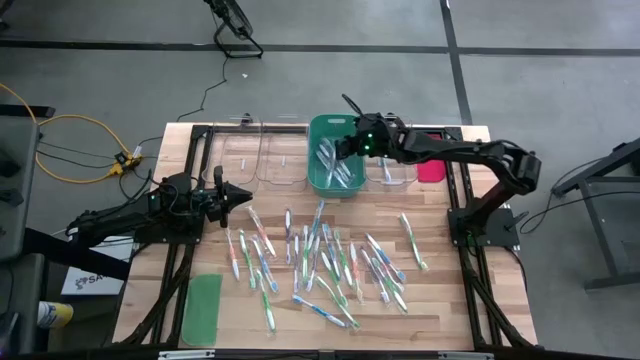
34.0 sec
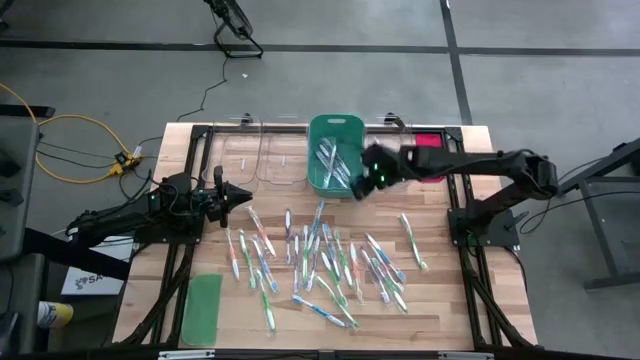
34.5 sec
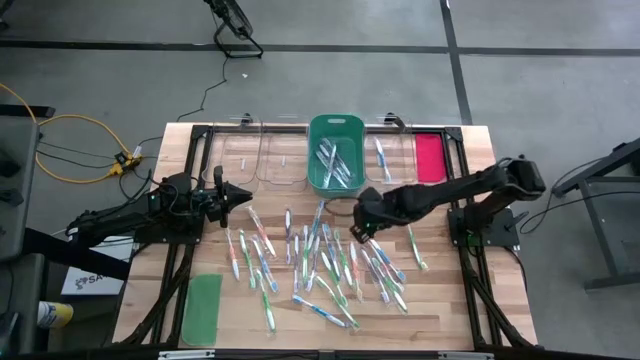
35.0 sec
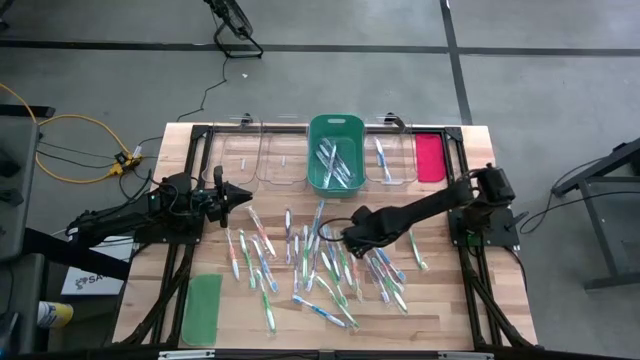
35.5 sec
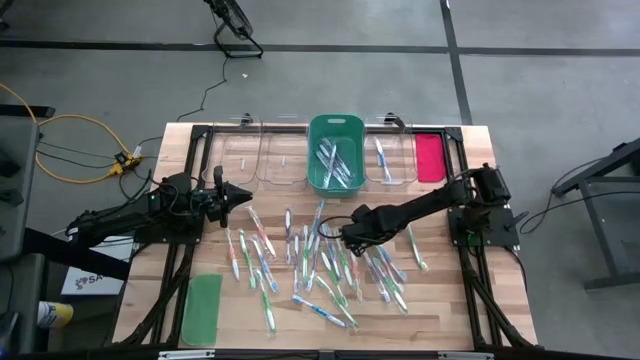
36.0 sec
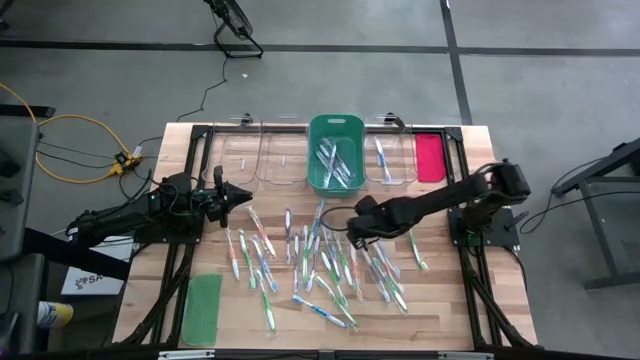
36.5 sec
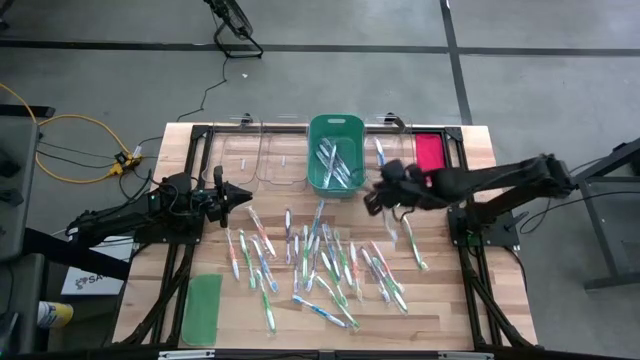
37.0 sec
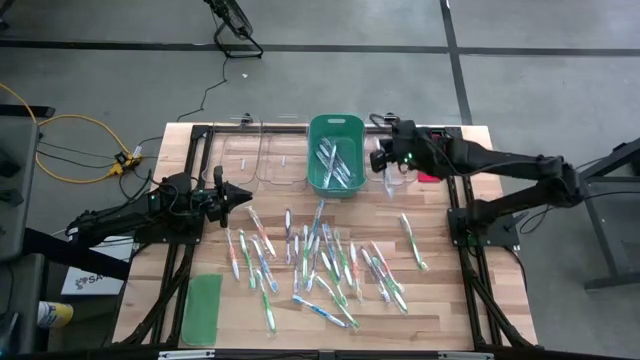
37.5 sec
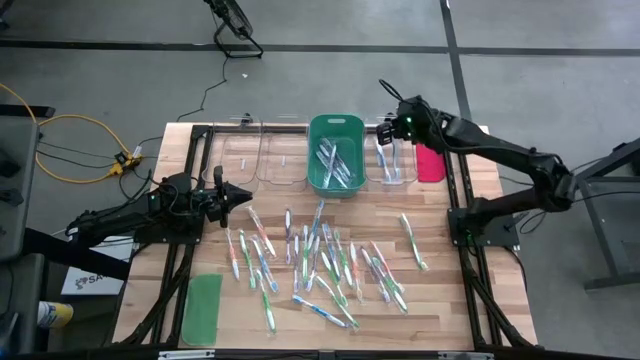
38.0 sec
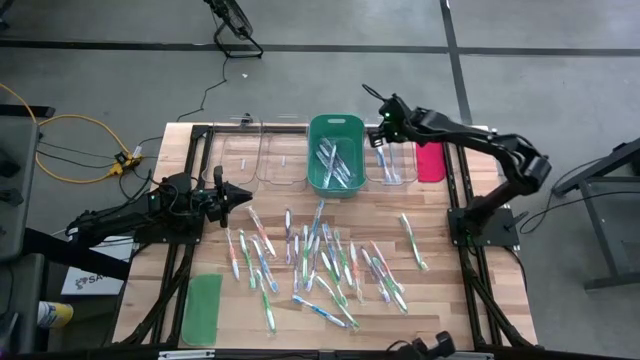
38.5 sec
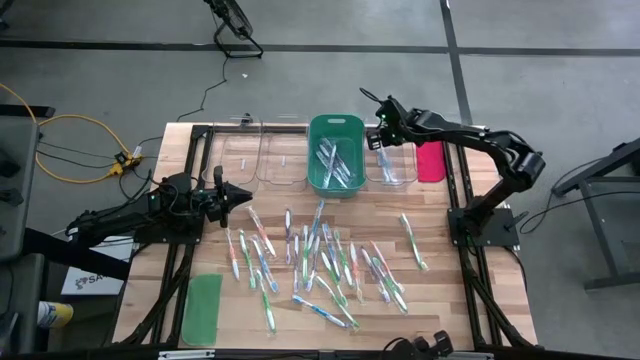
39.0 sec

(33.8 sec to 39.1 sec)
Task: Pick & Place Toothbrushes
Put the blue toothbrush into the right transparent bin

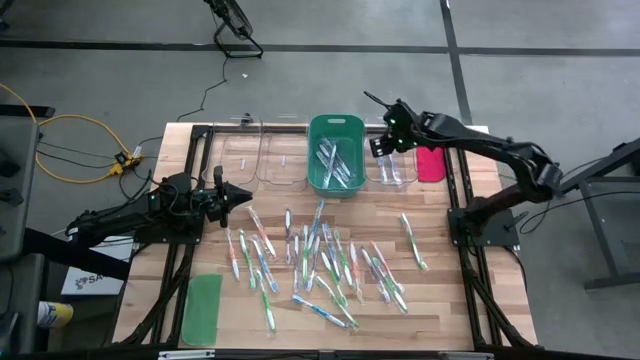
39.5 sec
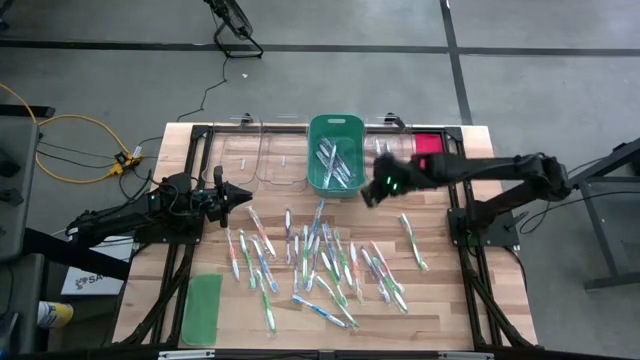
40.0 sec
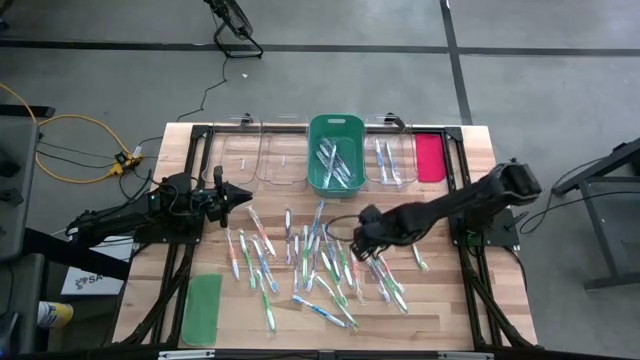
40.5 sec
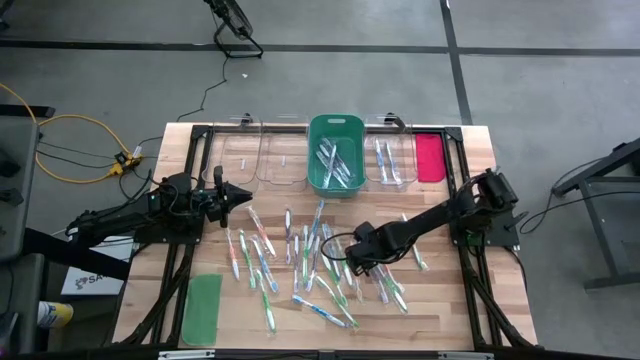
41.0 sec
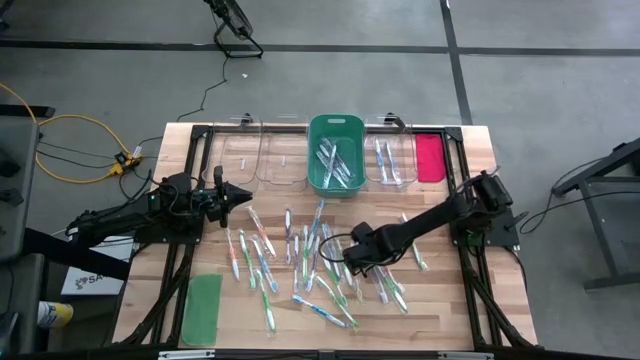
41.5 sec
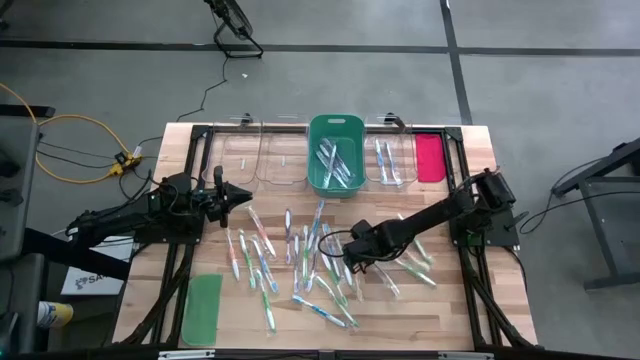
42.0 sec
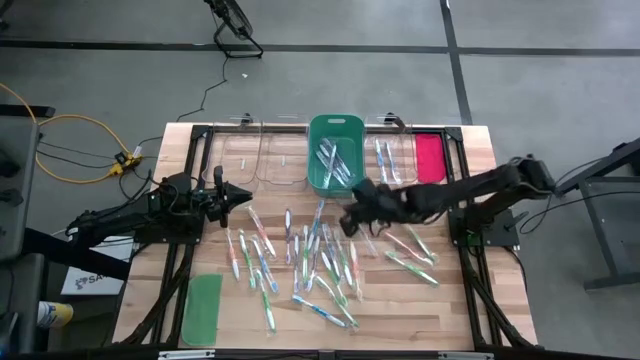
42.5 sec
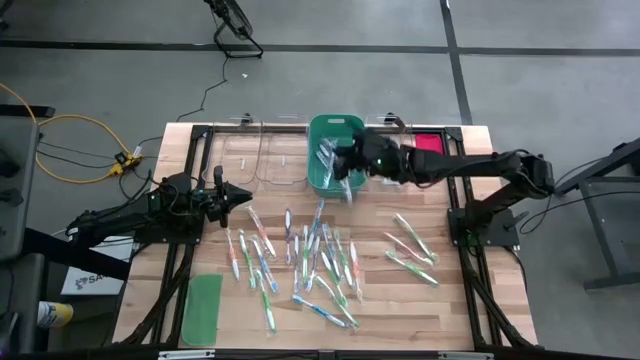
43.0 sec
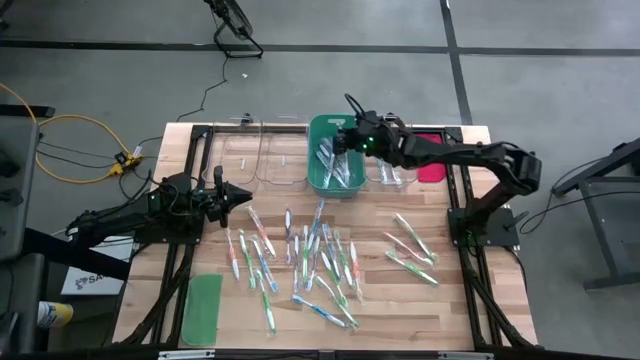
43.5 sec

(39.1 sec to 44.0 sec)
Put the purple toothbrush into the green bin

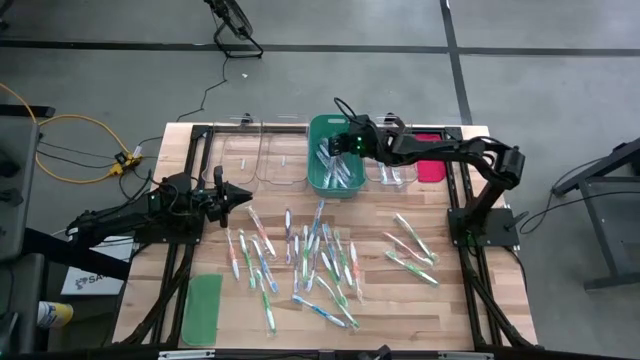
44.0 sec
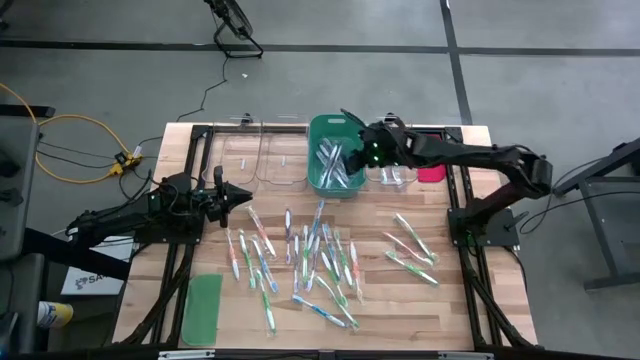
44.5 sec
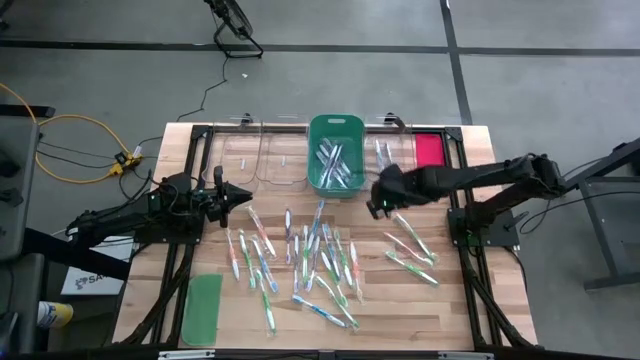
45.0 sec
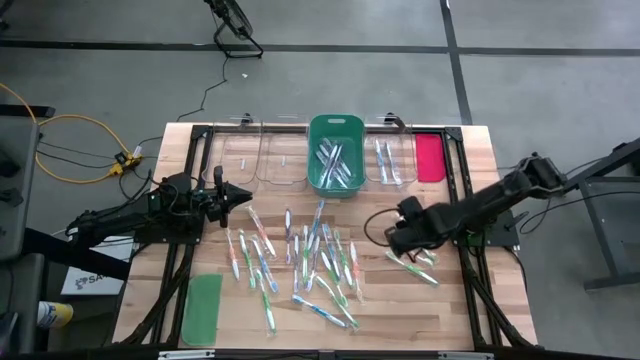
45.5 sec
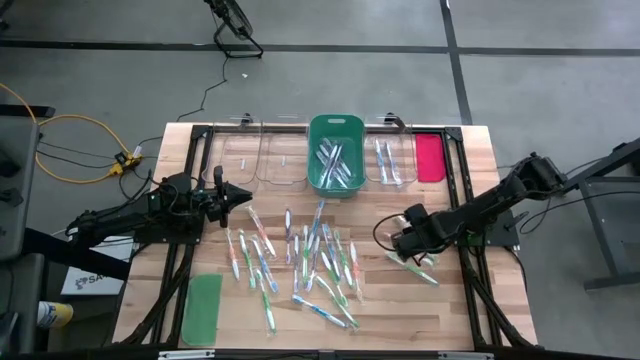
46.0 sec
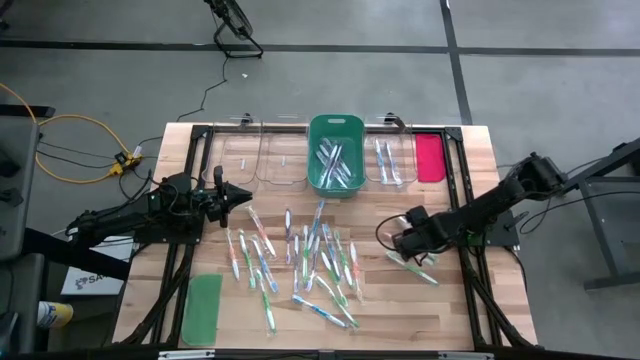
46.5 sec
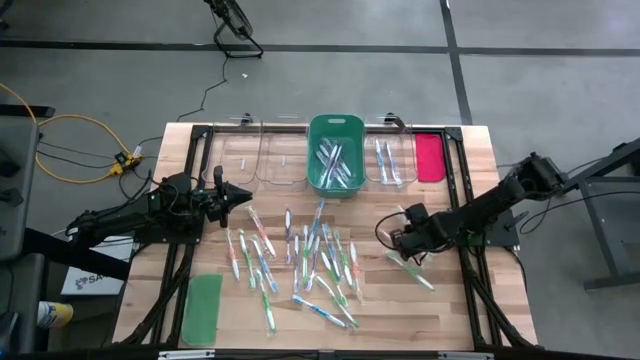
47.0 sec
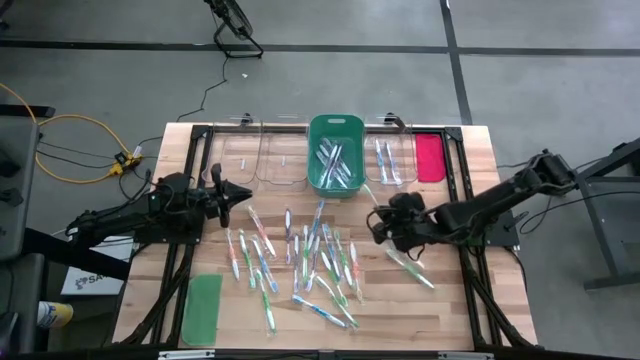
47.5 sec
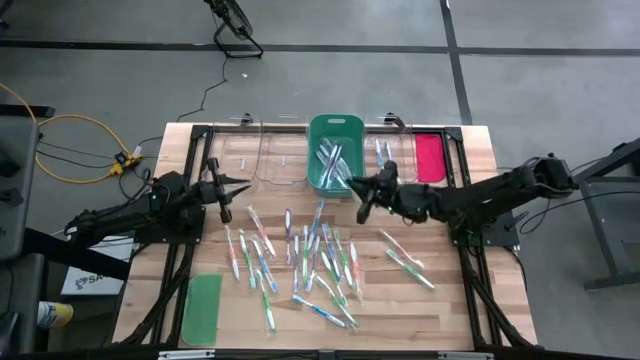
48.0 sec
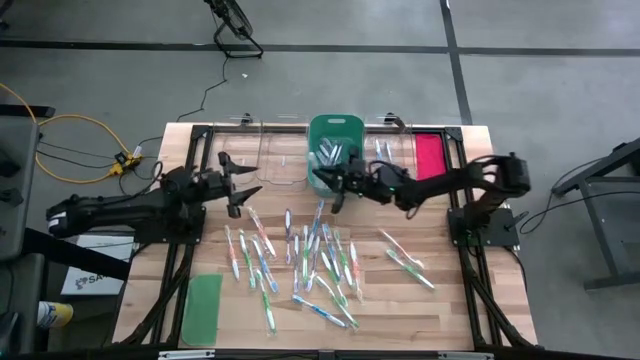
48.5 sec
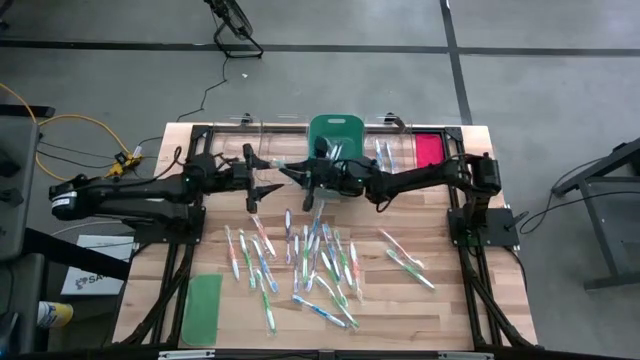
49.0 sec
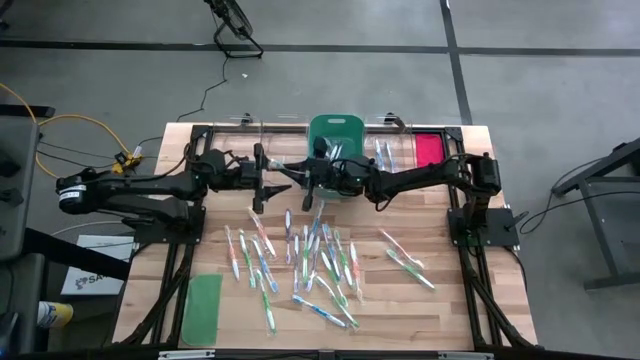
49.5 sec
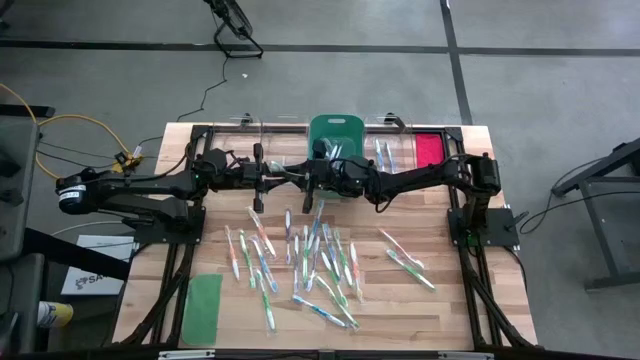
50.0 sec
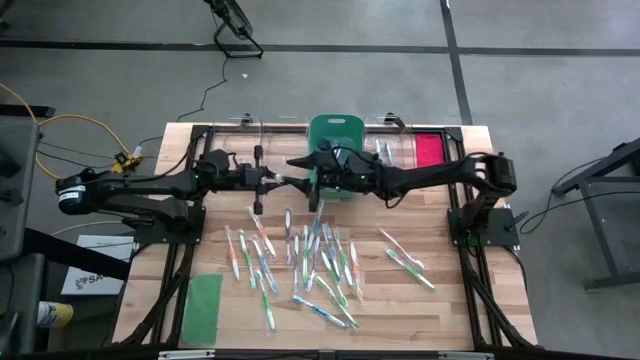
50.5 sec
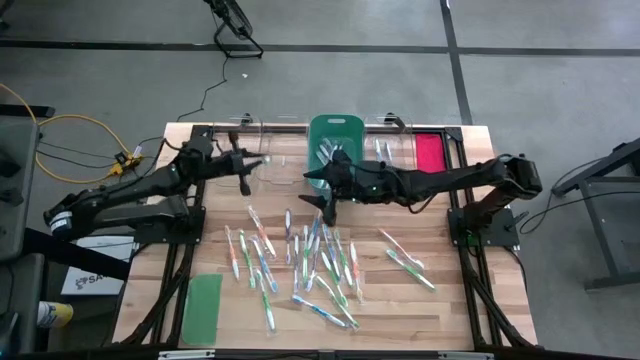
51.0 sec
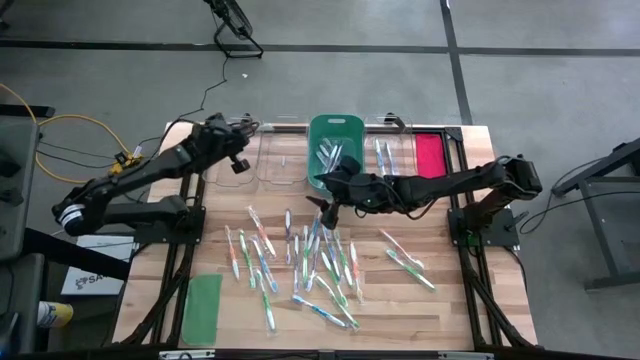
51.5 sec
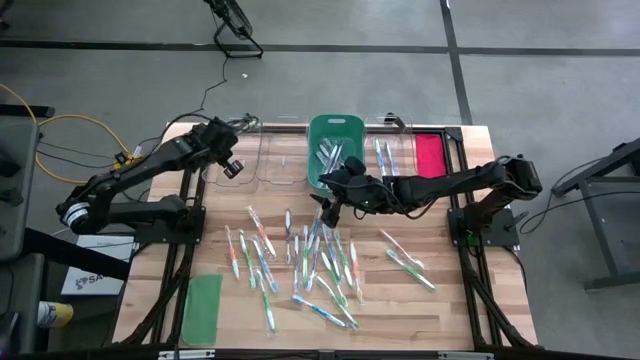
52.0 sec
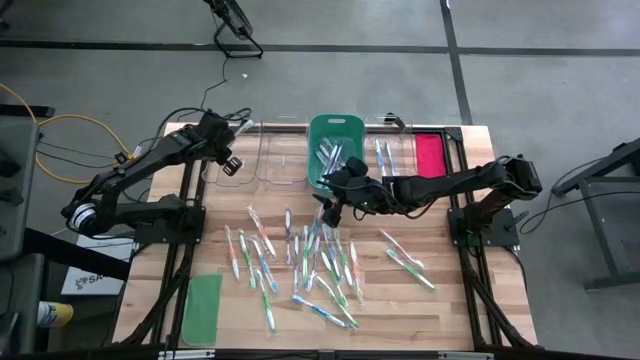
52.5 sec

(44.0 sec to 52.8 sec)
Put the green toothbrush into the left transparent bin

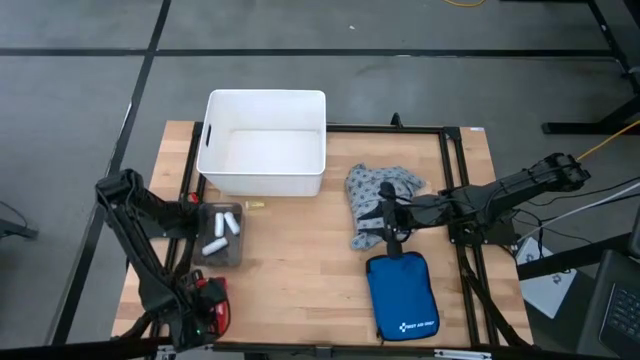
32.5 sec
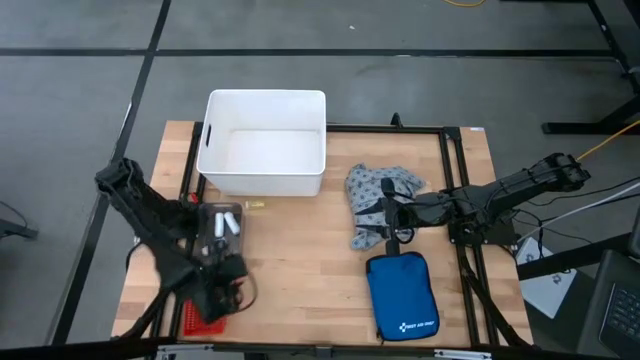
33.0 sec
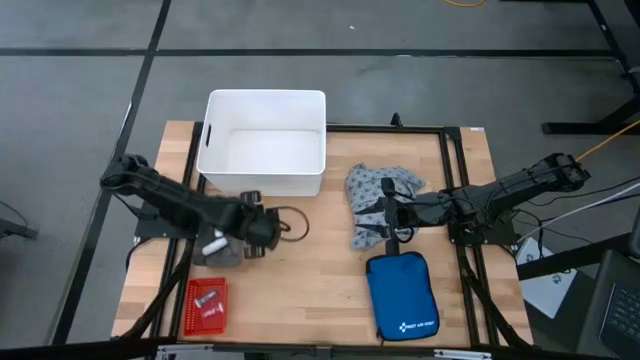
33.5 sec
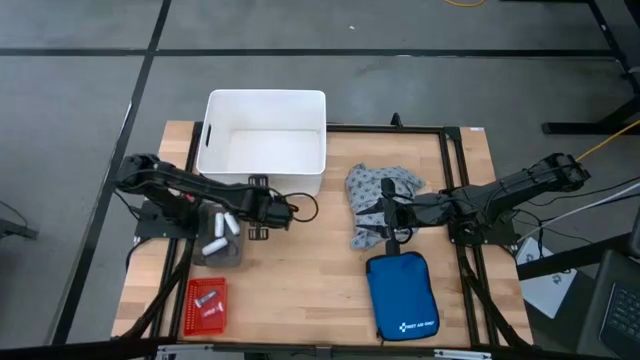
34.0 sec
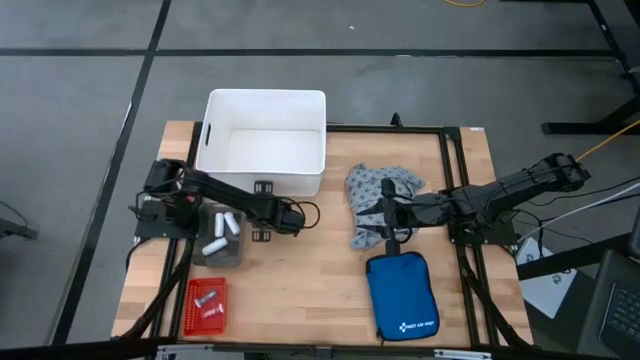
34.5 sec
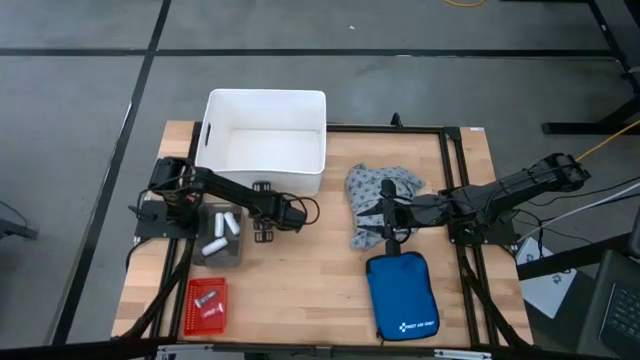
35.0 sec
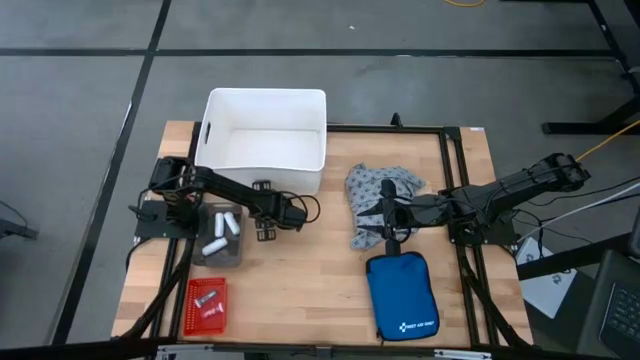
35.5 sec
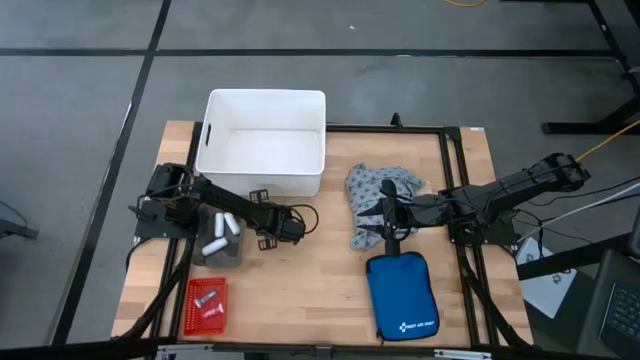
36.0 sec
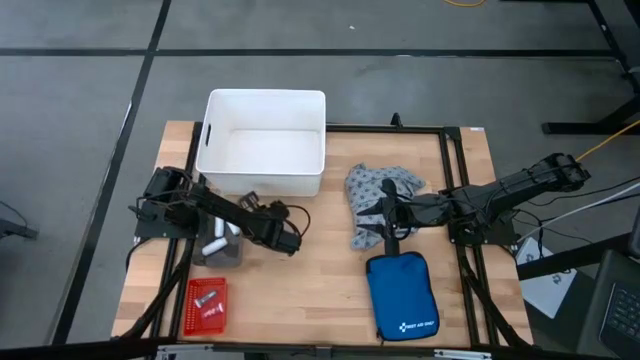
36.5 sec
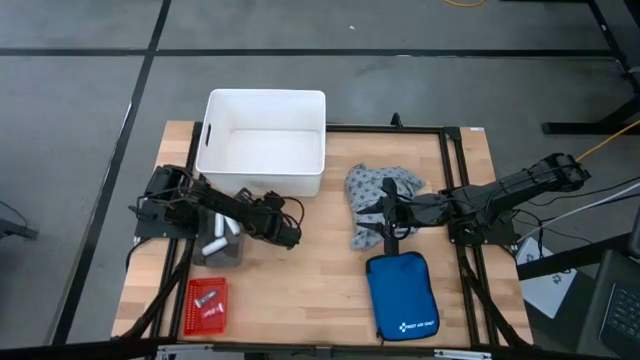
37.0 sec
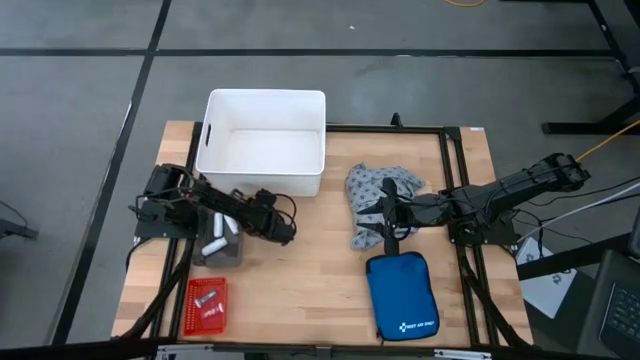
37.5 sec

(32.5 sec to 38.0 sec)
Task: Pick & place medical supplies in basket/bin
Put the yellow pill bottle into the red bin
